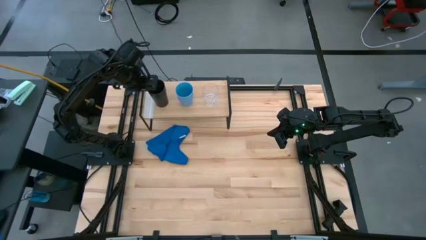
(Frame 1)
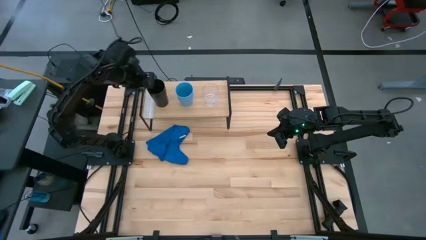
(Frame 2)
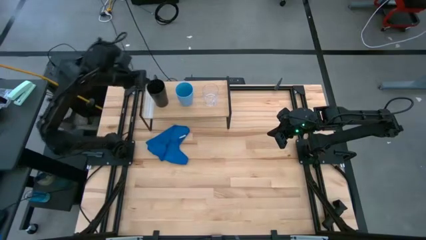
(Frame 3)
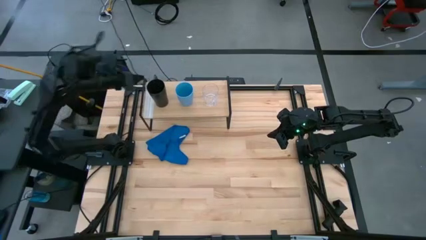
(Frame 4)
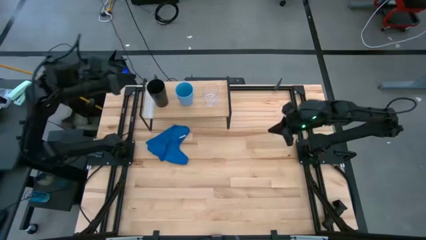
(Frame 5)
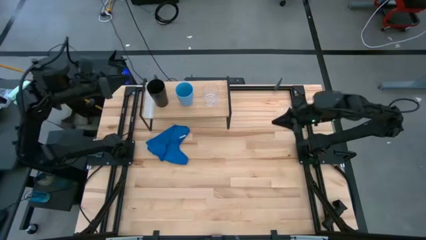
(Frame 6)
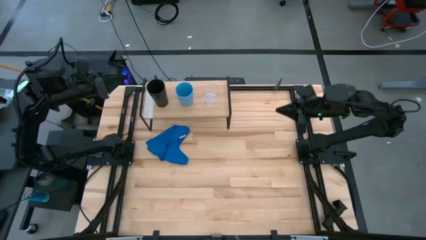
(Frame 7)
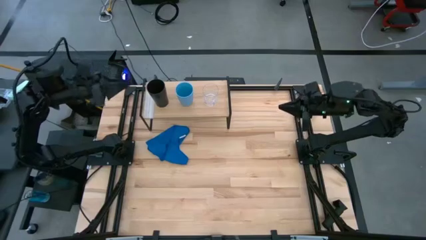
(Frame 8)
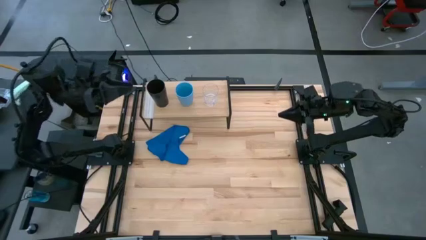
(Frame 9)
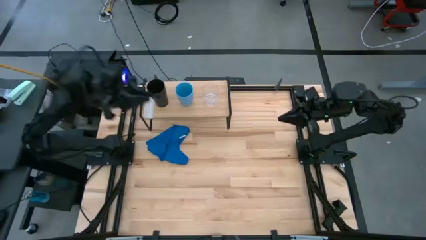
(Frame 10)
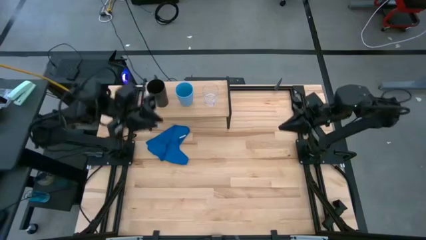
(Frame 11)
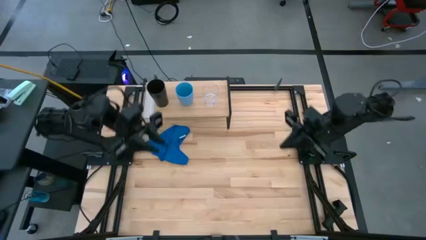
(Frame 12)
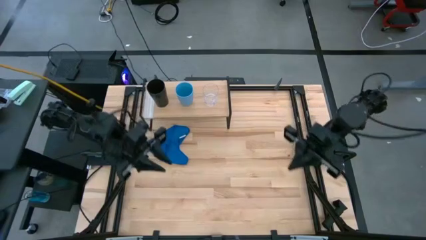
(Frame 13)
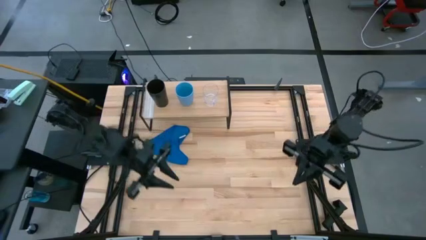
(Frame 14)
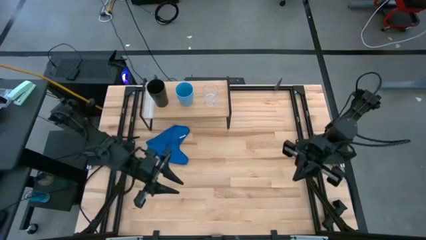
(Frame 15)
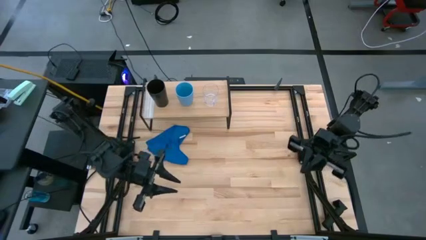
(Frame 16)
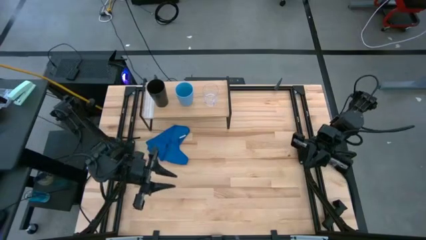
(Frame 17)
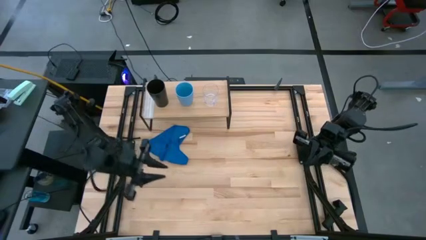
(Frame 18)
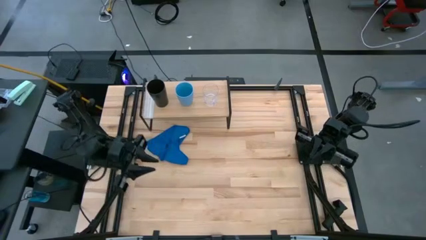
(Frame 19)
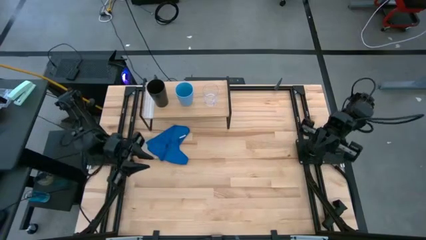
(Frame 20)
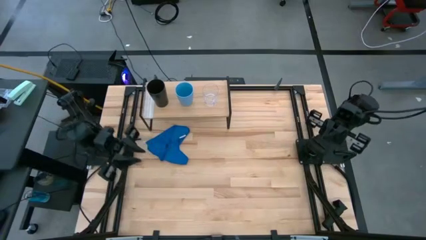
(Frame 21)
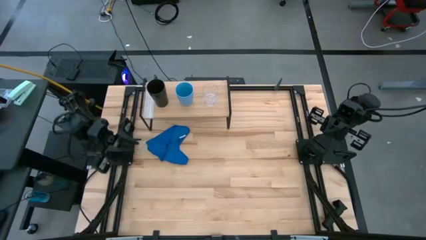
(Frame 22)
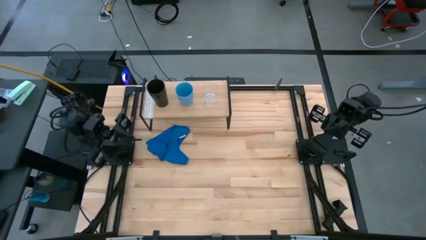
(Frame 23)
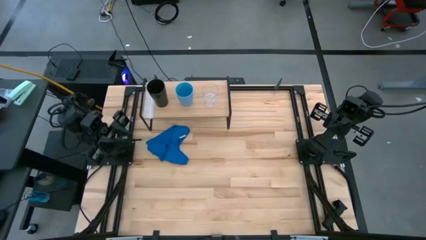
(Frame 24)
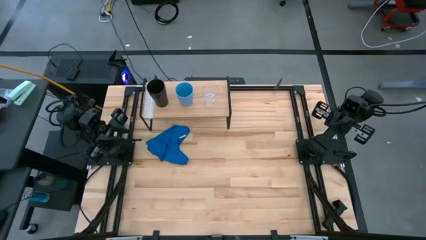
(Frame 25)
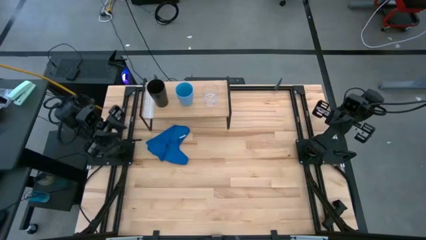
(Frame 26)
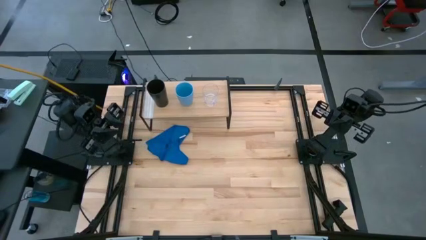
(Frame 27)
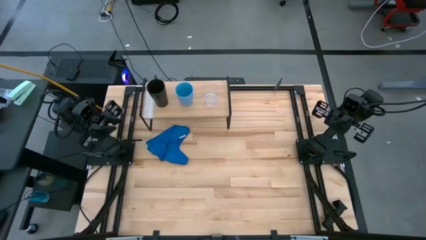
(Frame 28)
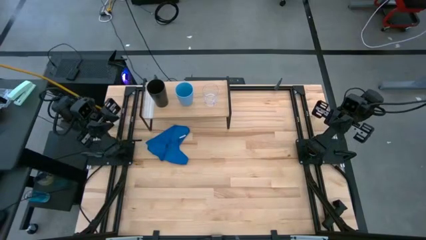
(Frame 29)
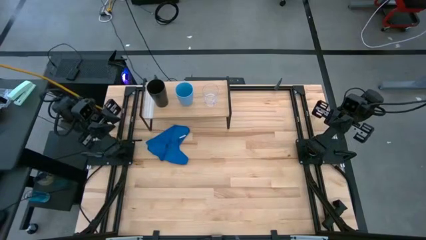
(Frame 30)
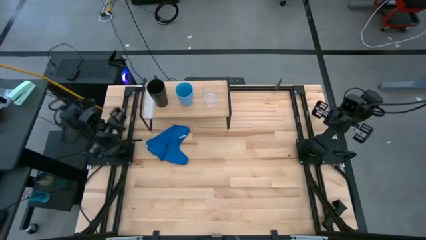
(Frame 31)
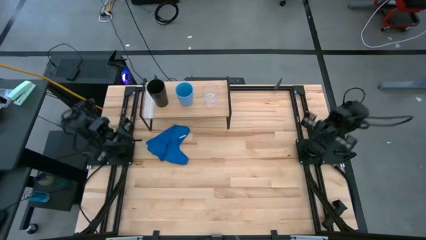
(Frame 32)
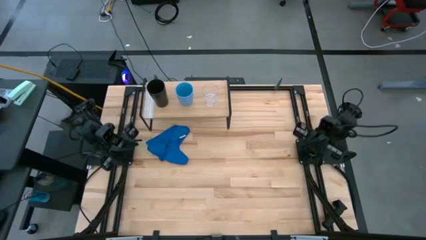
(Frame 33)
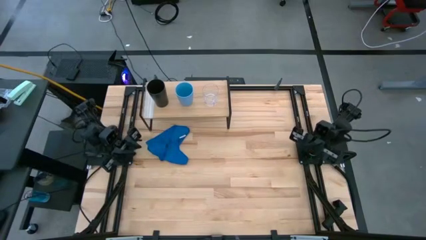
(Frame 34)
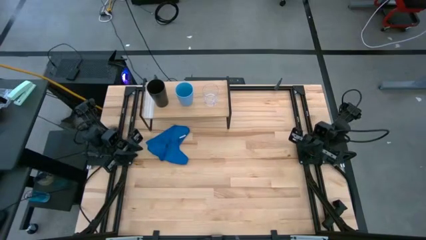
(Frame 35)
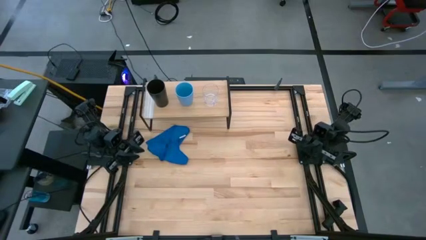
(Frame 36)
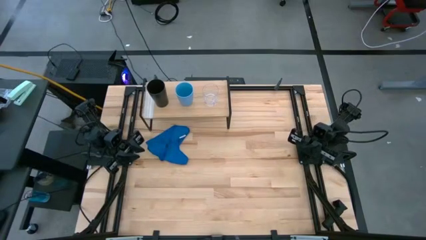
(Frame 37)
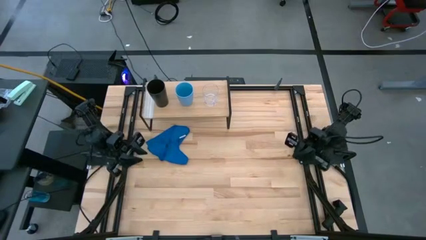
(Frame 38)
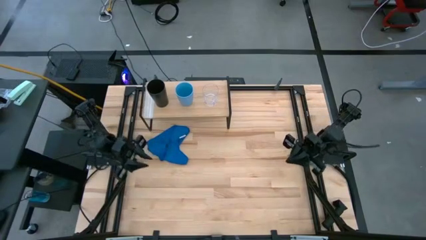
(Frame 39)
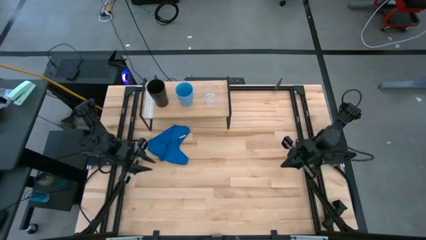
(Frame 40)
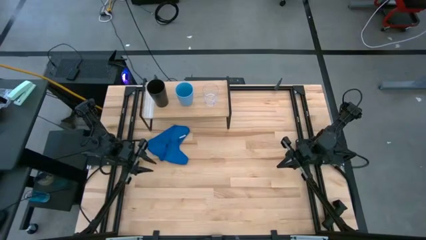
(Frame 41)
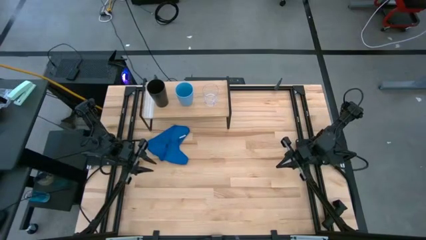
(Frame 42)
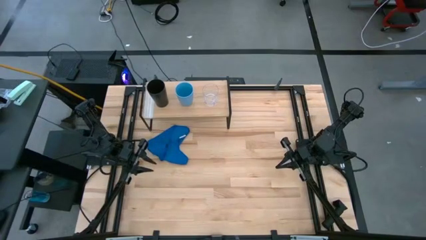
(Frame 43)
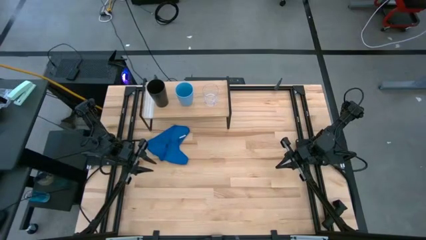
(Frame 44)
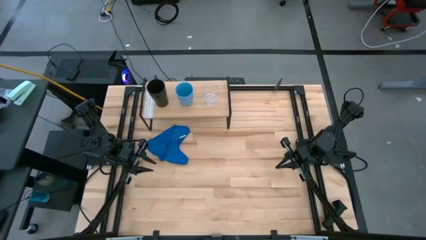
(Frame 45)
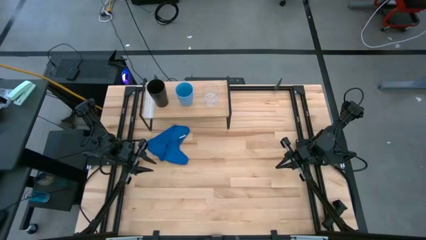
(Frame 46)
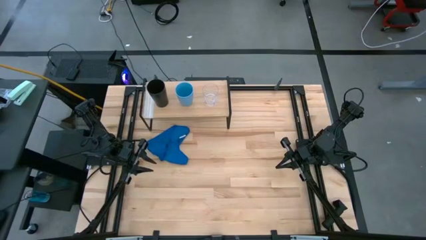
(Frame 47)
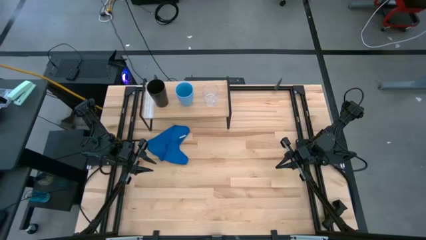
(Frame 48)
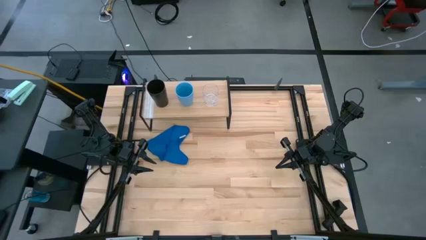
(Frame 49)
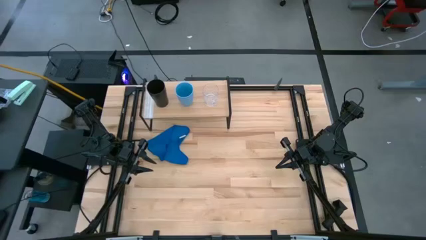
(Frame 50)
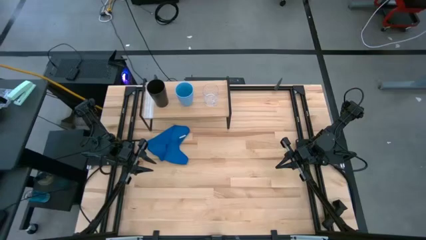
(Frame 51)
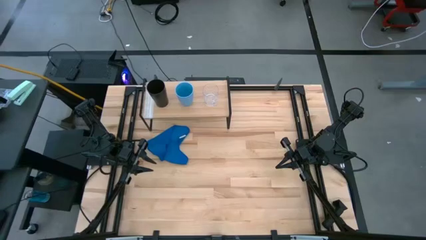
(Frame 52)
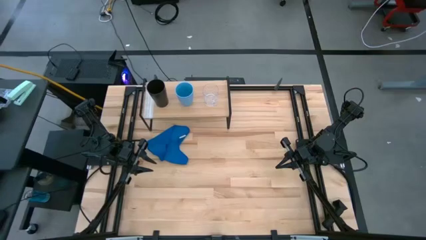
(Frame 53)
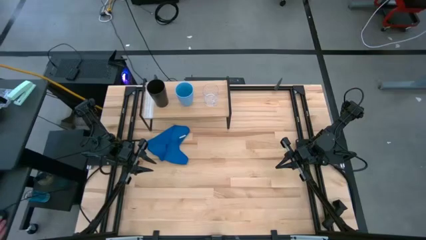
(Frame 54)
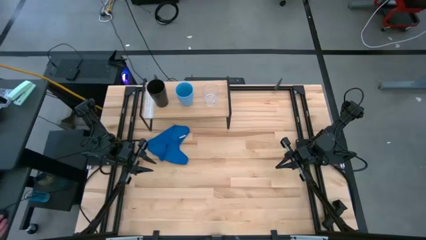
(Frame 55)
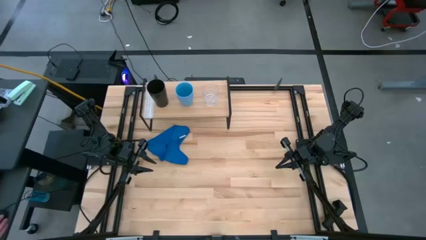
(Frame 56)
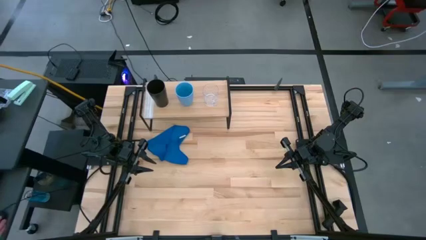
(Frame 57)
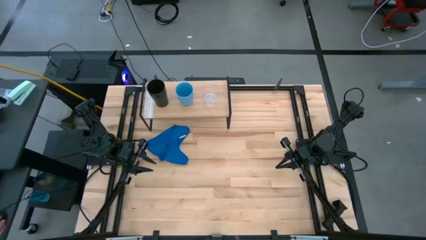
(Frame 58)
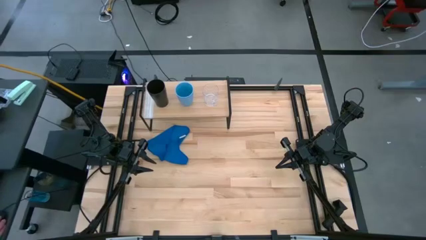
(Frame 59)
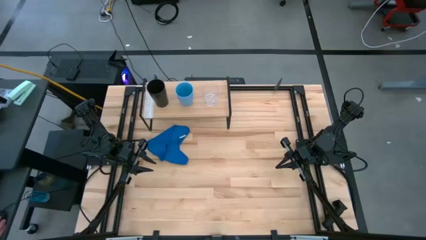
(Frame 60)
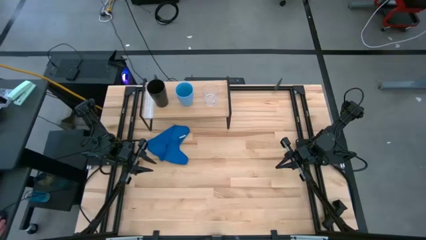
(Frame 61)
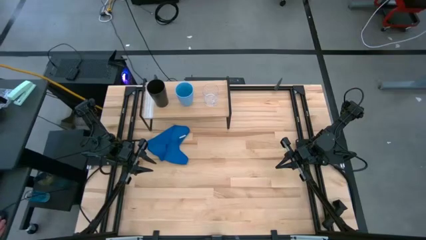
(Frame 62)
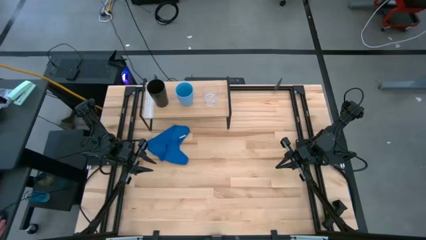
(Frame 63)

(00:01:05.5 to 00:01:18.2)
Task: Stack small to large cups/mugs on shelf
Return to Home Position
